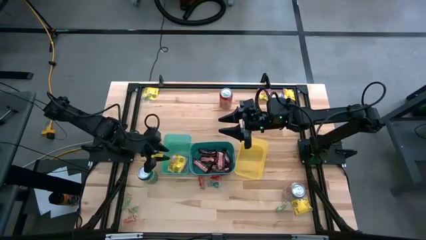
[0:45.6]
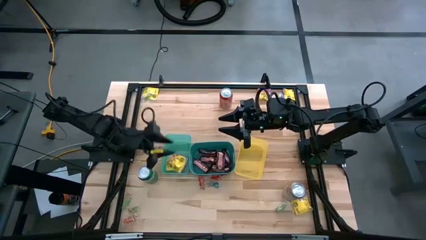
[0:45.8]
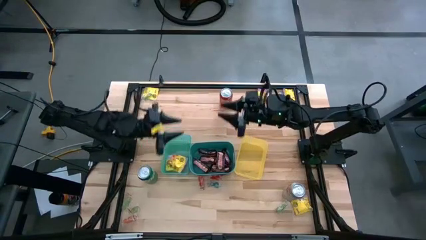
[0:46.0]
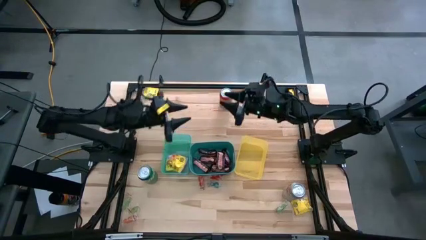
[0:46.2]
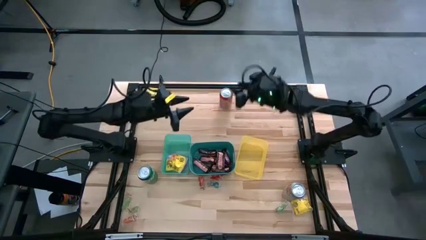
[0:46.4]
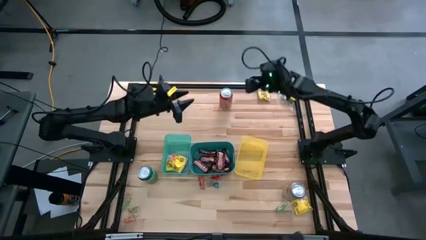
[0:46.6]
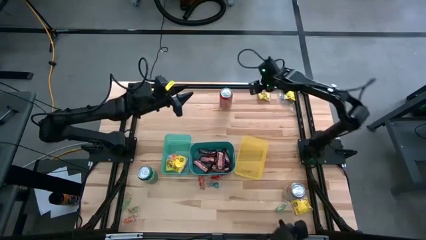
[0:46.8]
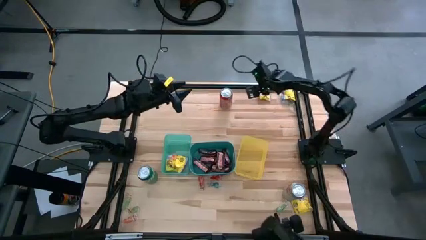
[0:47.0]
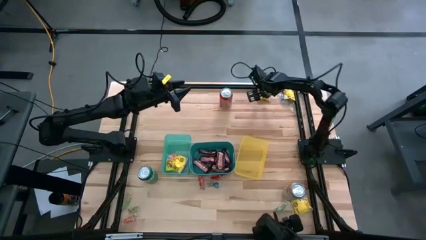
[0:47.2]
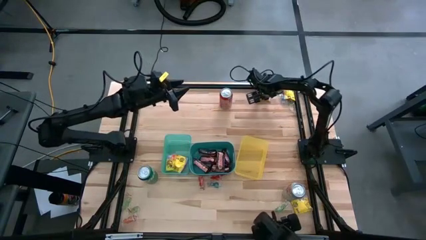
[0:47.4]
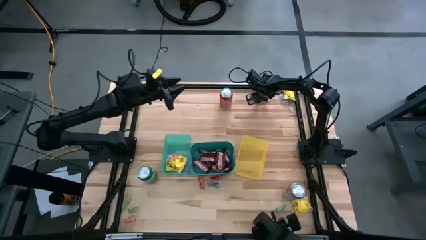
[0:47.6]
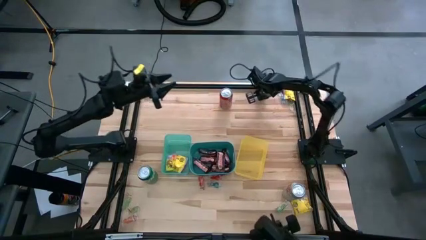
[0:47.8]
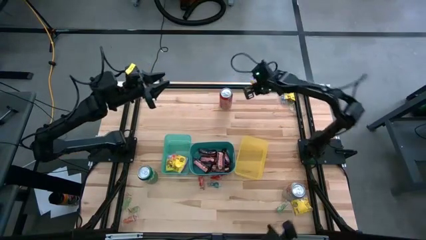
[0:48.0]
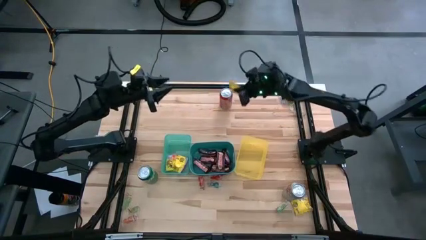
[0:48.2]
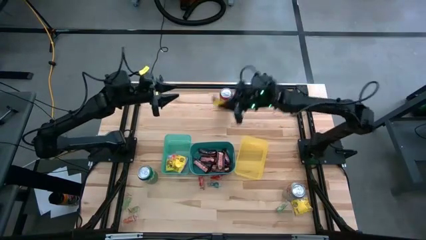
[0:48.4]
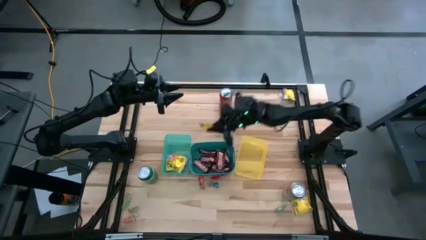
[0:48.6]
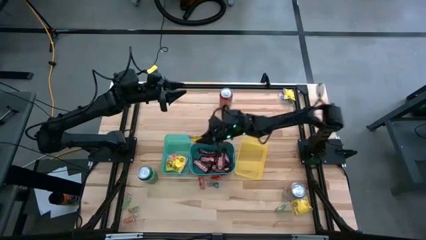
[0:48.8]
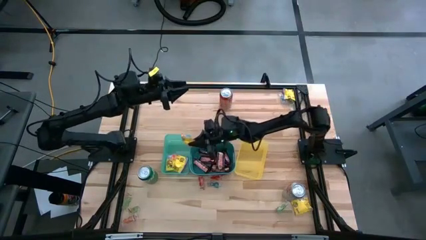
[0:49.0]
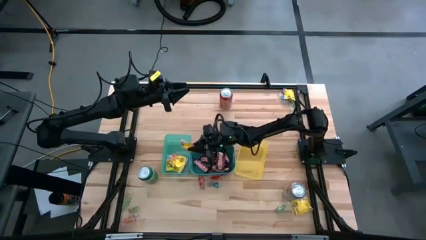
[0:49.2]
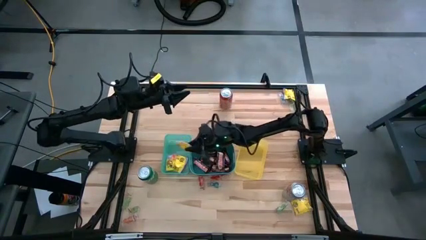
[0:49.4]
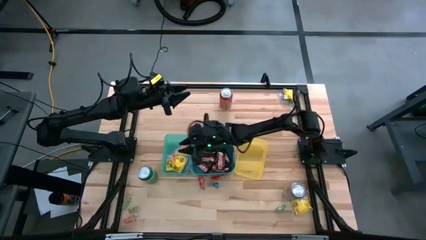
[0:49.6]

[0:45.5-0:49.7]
Task: Sort candy
Put the yellow candy into the green bin

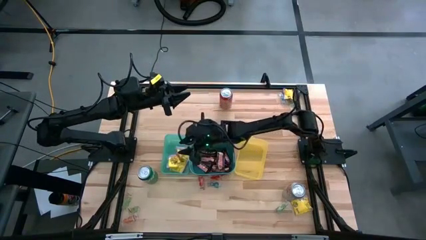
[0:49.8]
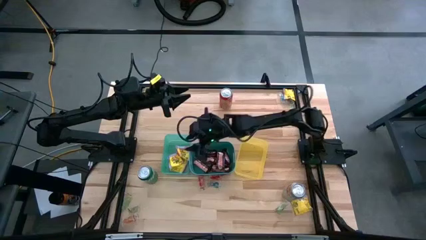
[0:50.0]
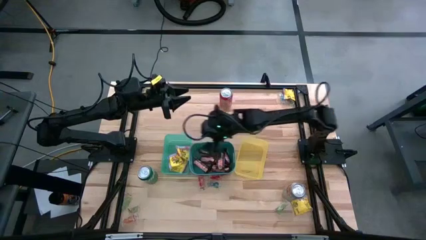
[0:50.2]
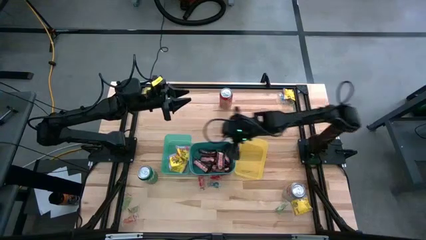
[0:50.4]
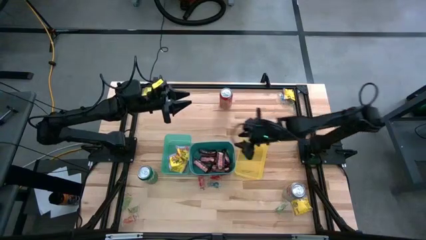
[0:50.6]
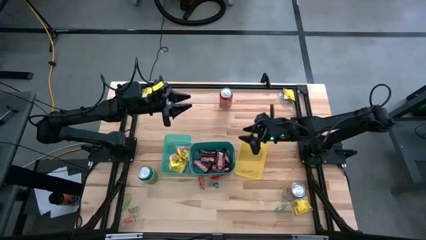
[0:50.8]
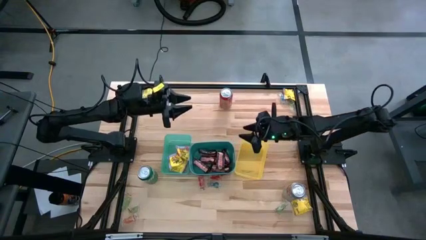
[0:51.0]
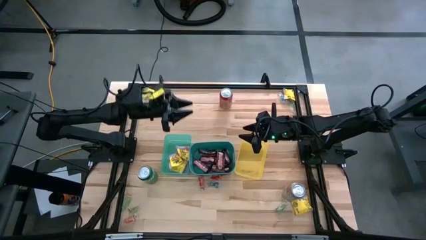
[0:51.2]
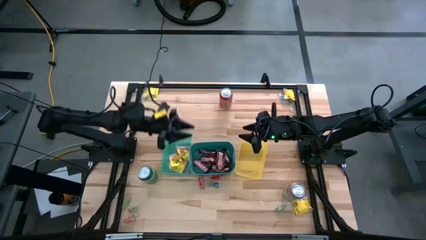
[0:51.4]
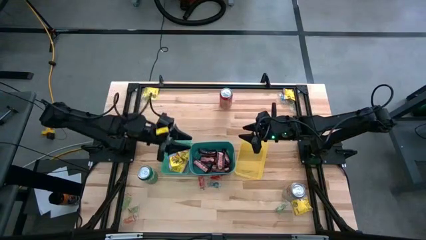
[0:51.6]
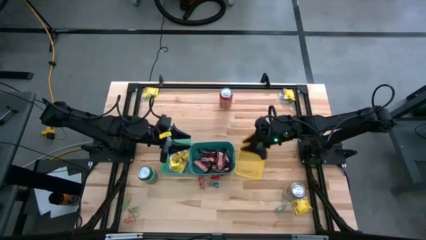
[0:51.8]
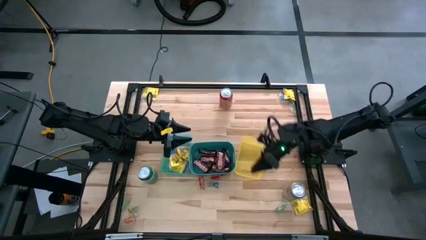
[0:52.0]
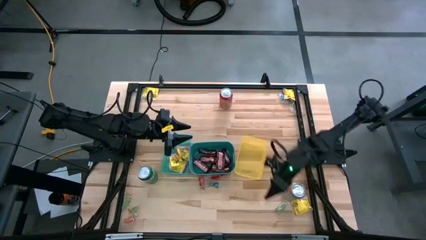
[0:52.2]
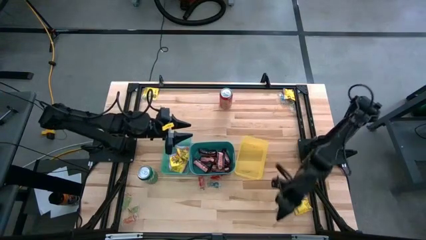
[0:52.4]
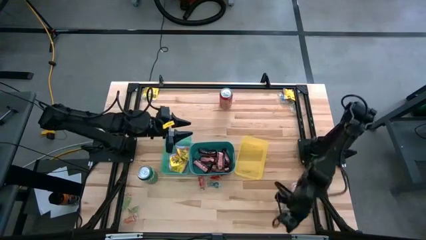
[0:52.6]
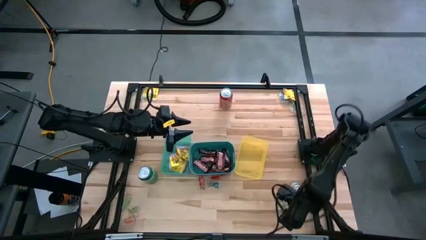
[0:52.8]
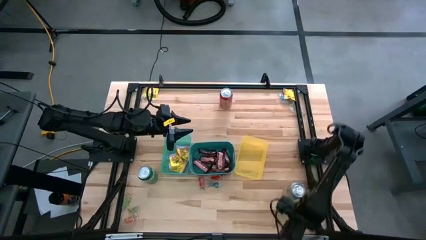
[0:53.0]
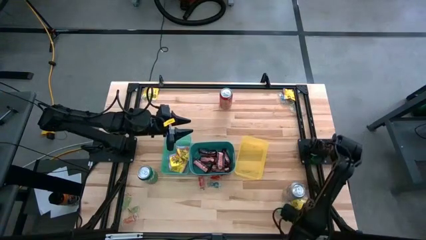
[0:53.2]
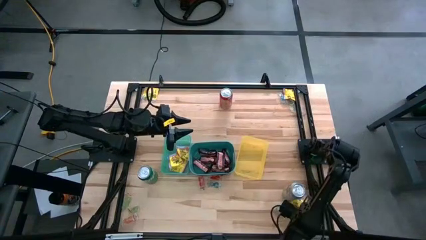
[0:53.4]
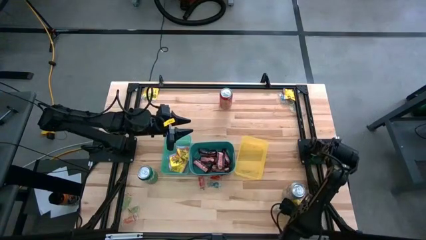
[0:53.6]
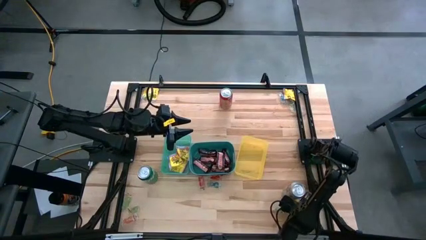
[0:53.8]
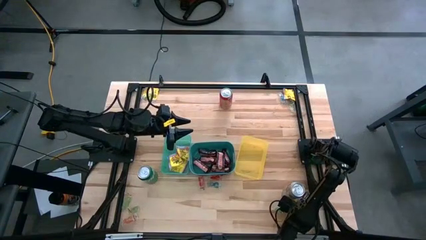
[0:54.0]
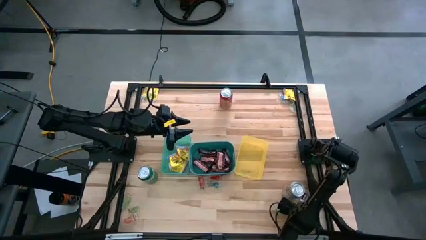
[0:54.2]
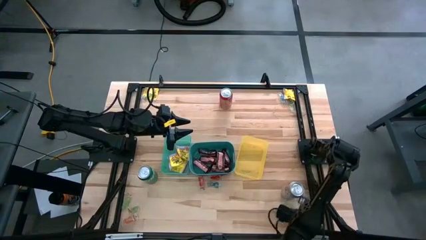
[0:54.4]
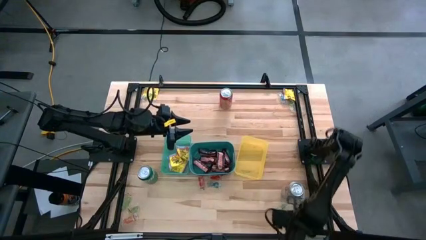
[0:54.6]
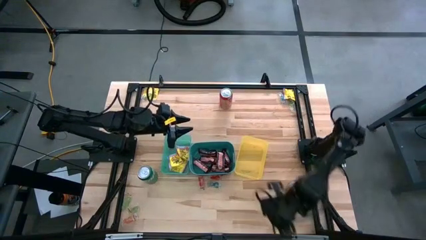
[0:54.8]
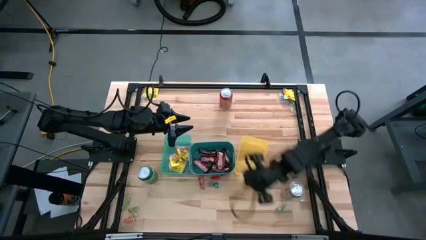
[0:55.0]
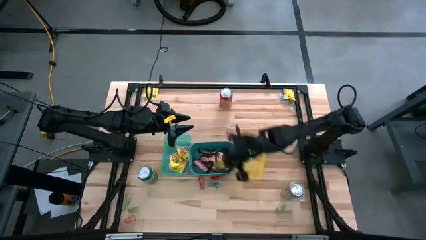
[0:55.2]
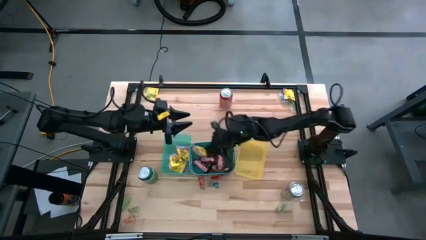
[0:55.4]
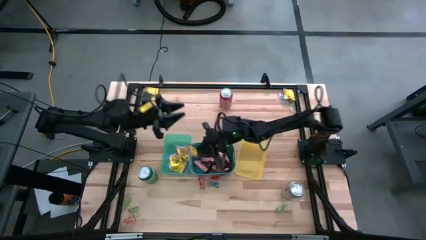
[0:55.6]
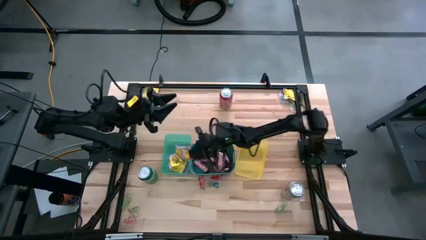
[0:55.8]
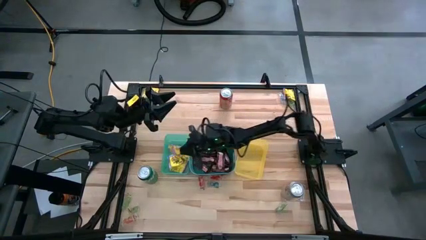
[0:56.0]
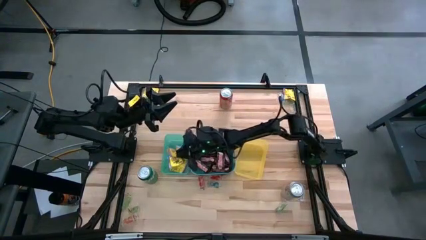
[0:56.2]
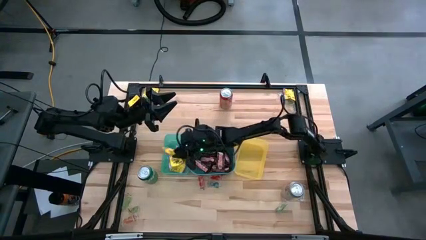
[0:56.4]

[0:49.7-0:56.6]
Put the yellow candy into the green bin

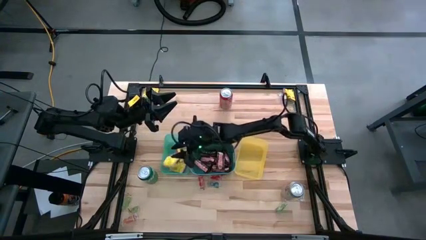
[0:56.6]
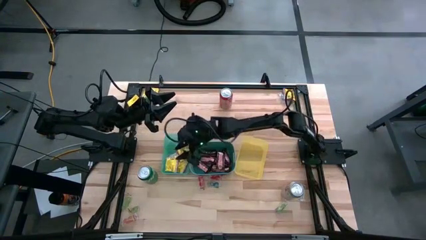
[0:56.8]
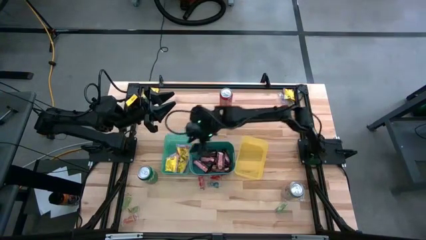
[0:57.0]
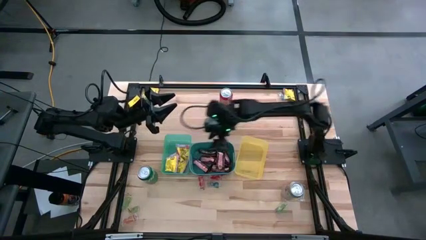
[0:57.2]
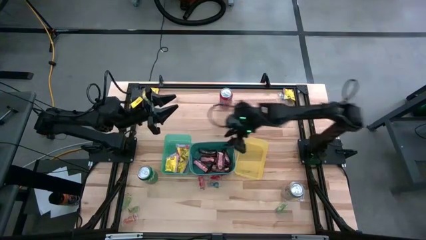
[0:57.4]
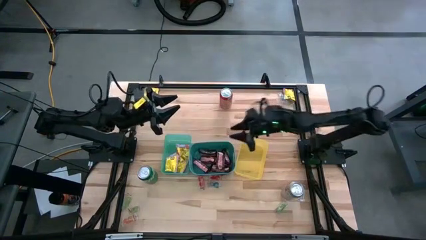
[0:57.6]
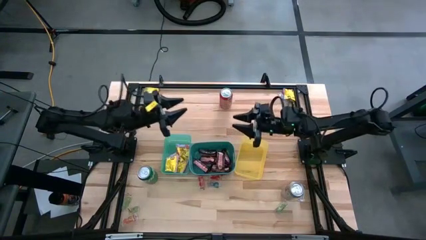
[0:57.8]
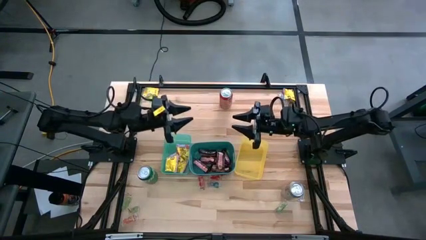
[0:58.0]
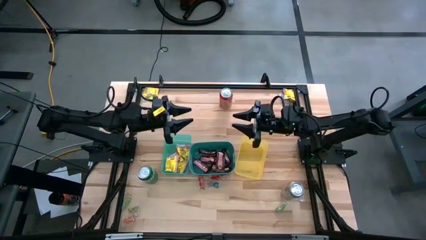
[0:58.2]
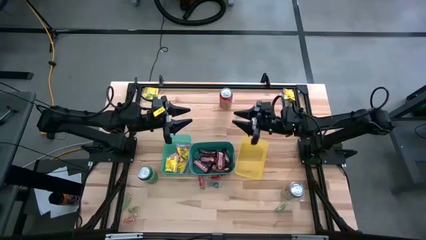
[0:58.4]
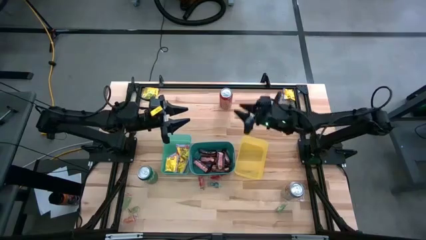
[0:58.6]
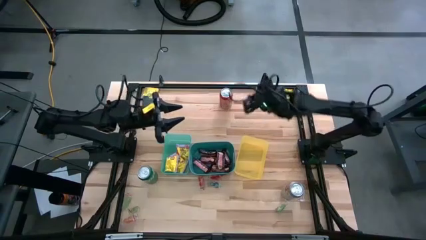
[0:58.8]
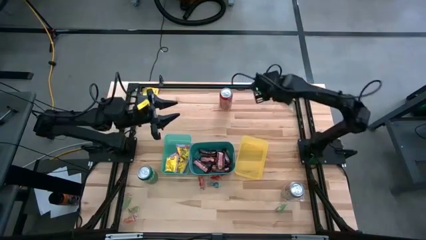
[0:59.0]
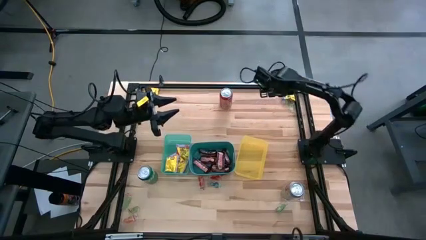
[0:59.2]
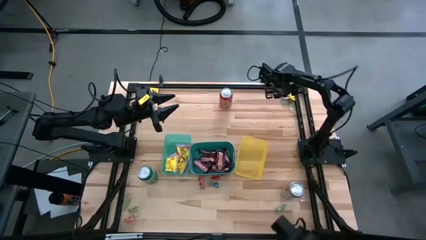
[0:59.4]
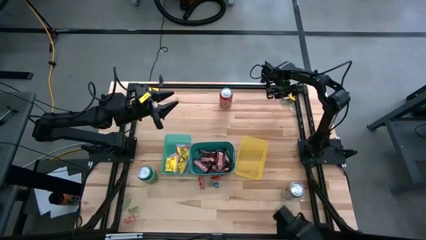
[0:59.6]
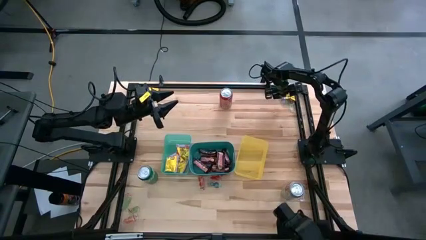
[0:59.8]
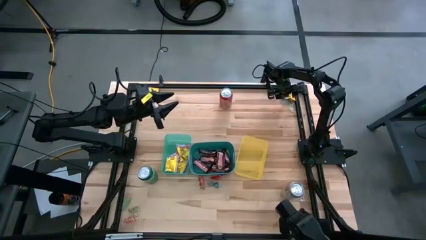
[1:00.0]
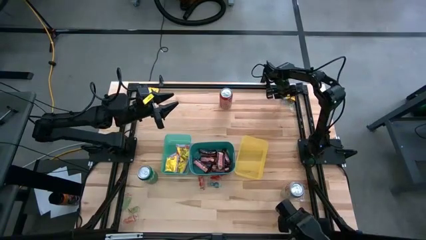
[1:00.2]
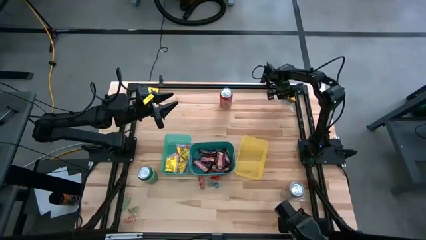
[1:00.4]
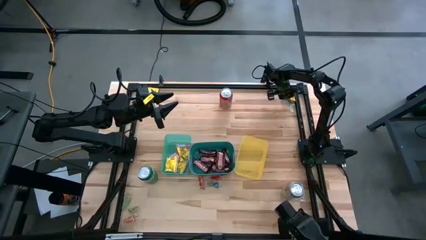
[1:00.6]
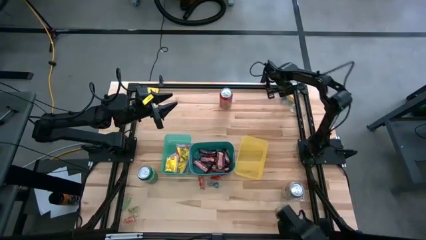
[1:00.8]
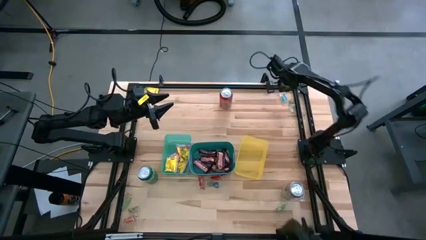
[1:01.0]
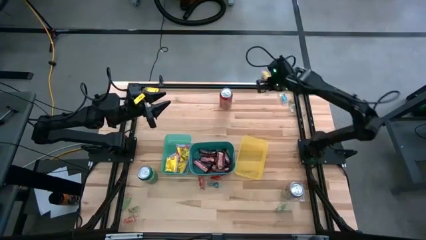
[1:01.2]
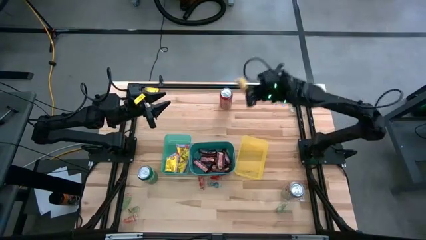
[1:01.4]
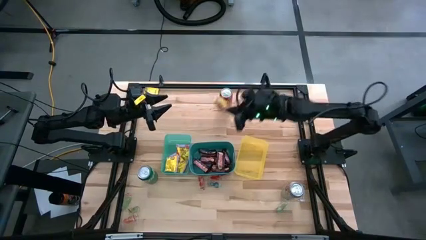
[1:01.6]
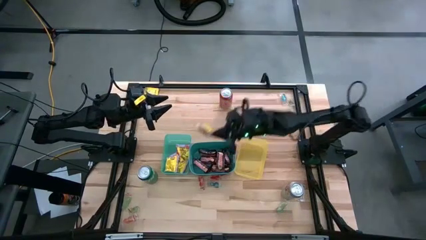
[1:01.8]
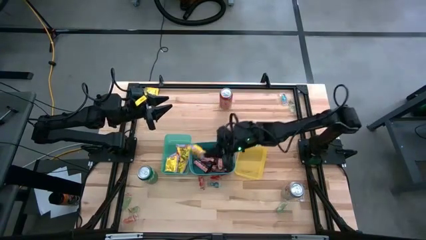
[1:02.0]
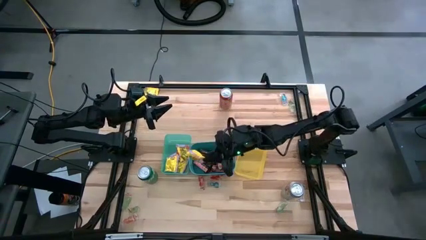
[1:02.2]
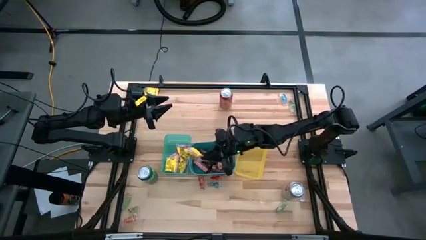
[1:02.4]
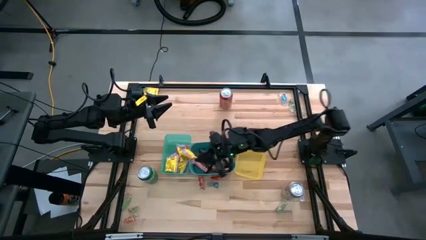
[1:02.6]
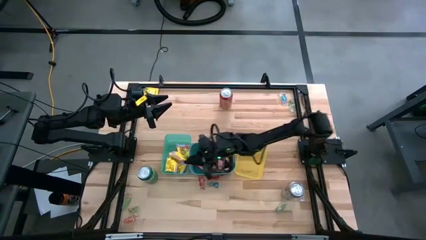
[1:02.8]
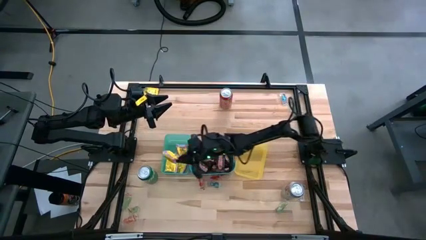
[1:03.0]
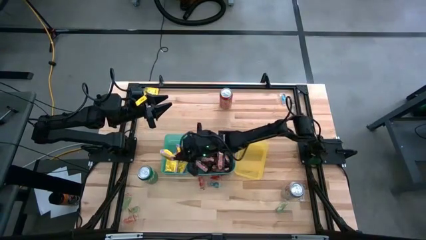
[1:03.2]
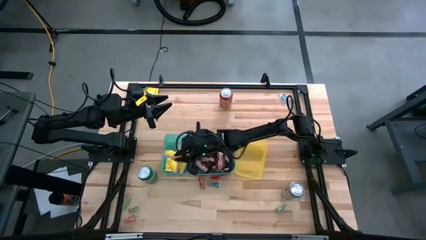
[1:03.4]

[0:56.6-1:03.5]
Put the yellow candy into the green bin
